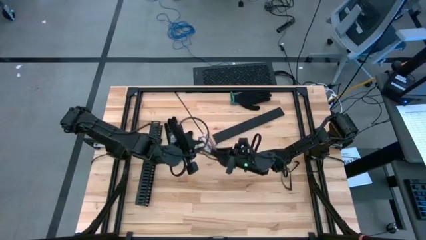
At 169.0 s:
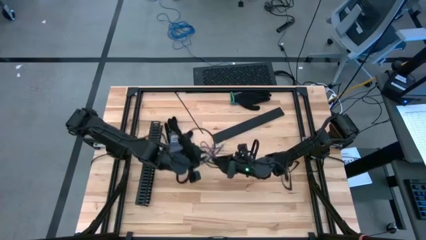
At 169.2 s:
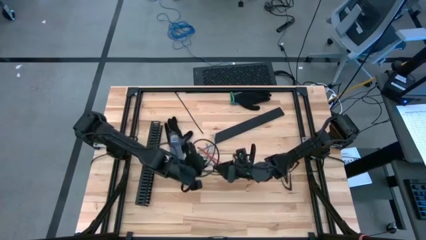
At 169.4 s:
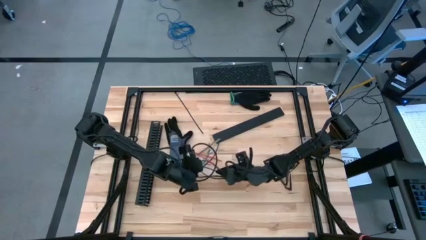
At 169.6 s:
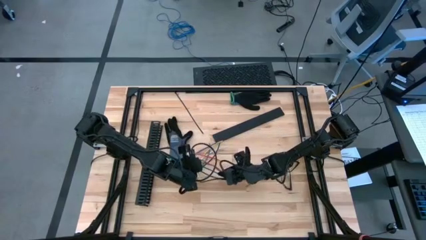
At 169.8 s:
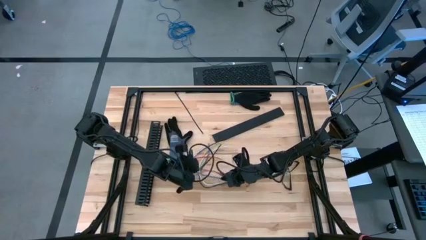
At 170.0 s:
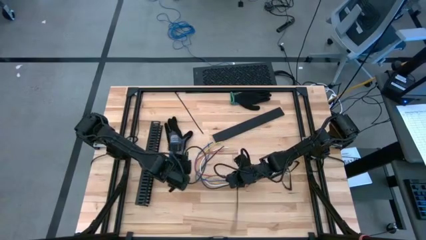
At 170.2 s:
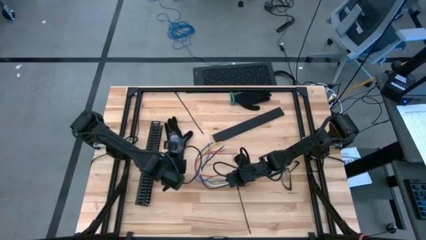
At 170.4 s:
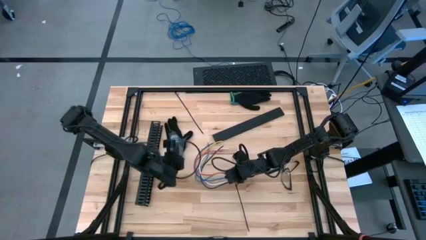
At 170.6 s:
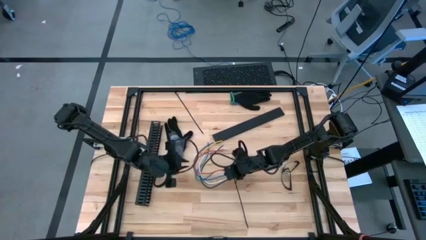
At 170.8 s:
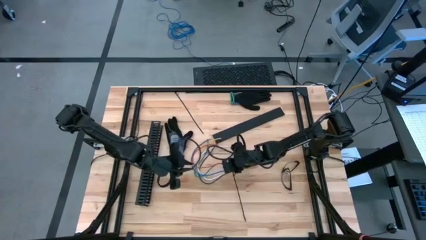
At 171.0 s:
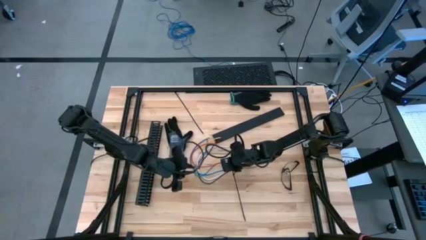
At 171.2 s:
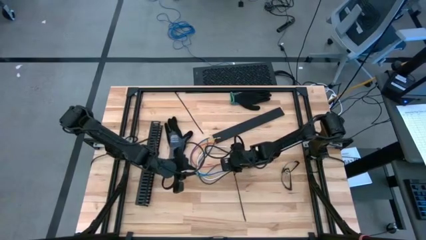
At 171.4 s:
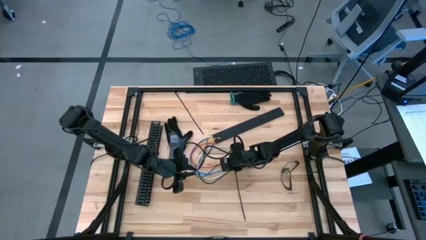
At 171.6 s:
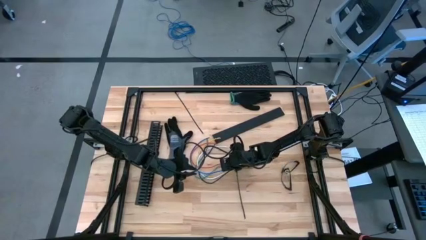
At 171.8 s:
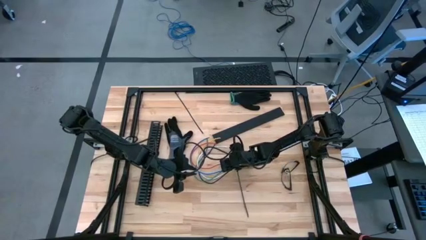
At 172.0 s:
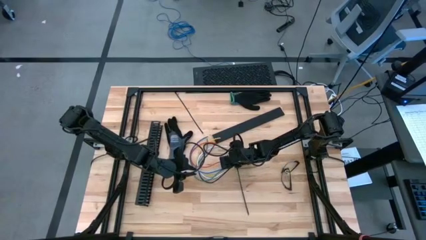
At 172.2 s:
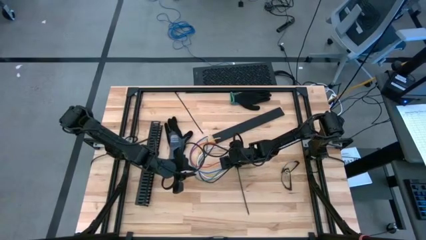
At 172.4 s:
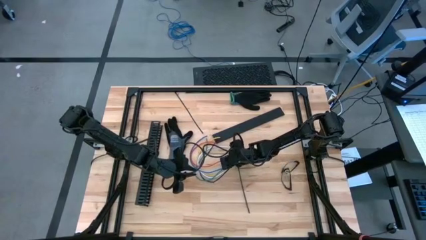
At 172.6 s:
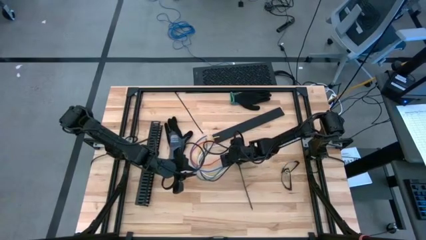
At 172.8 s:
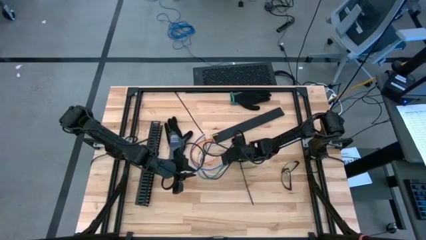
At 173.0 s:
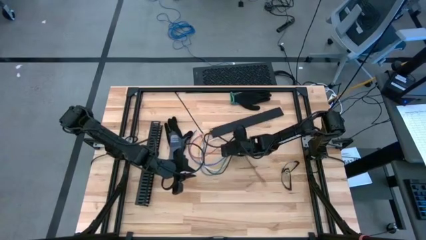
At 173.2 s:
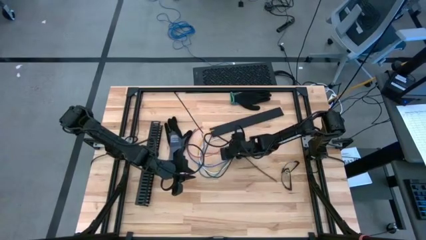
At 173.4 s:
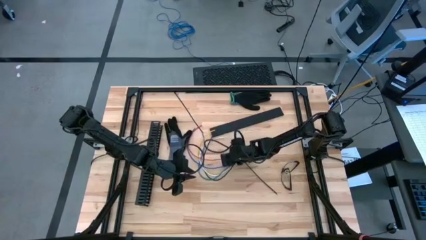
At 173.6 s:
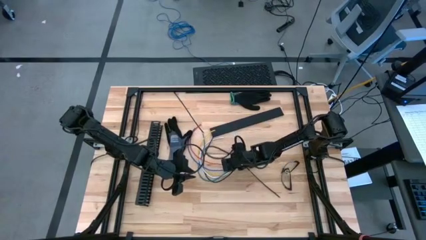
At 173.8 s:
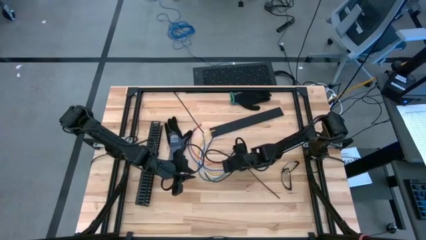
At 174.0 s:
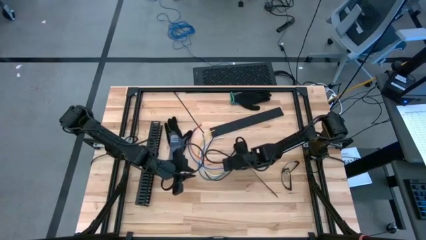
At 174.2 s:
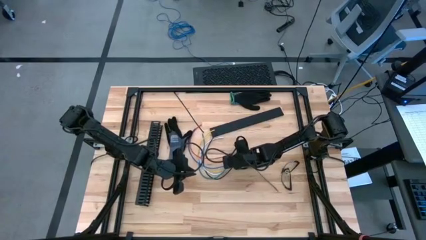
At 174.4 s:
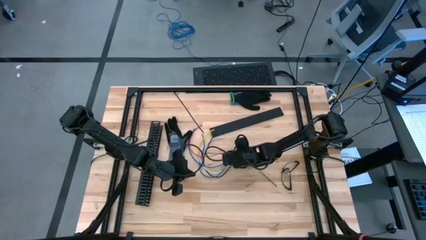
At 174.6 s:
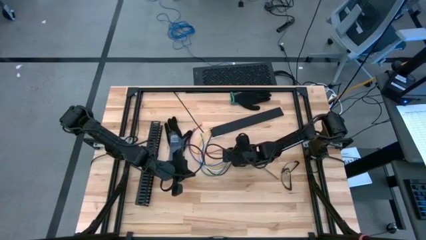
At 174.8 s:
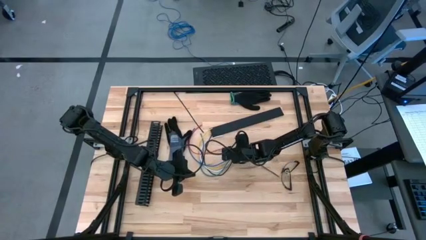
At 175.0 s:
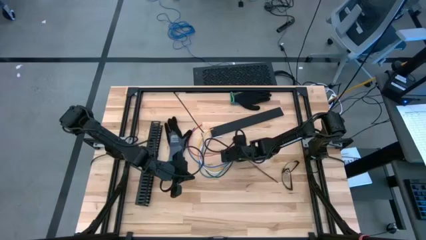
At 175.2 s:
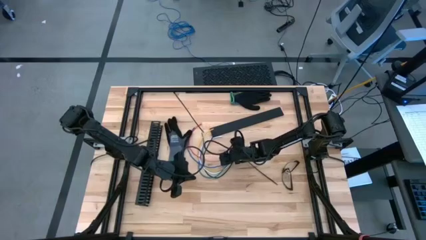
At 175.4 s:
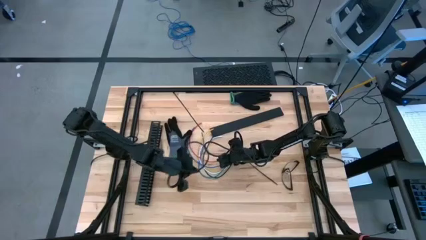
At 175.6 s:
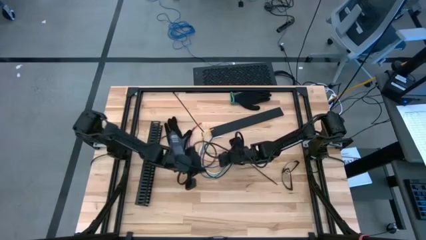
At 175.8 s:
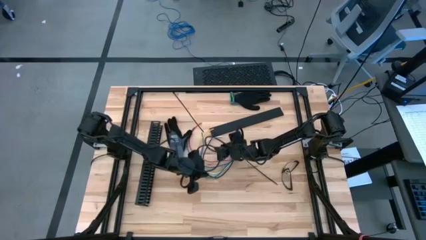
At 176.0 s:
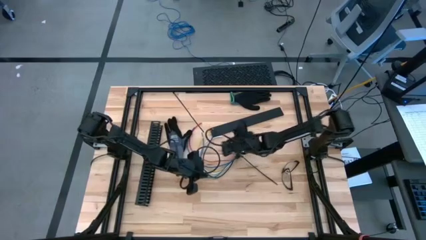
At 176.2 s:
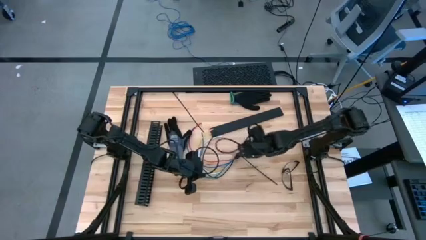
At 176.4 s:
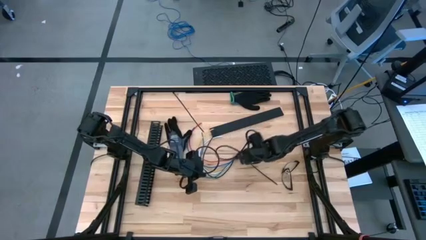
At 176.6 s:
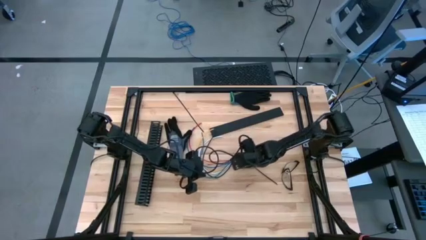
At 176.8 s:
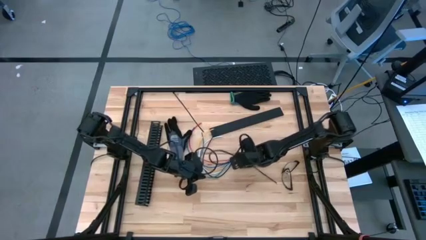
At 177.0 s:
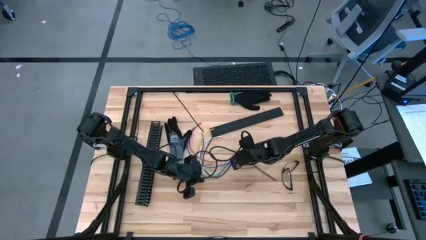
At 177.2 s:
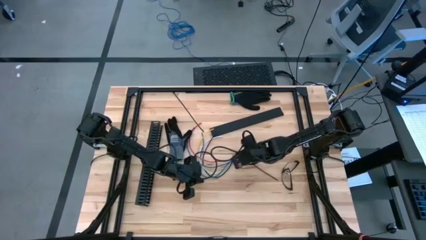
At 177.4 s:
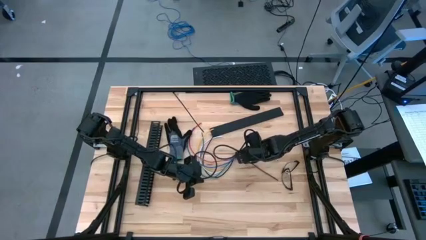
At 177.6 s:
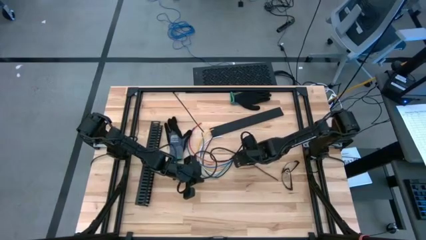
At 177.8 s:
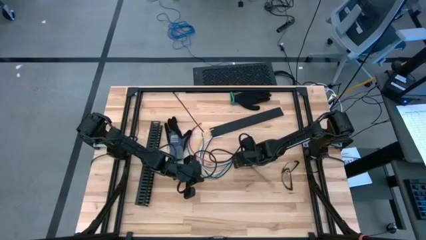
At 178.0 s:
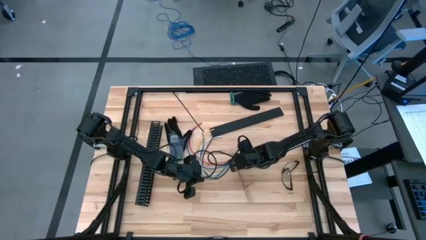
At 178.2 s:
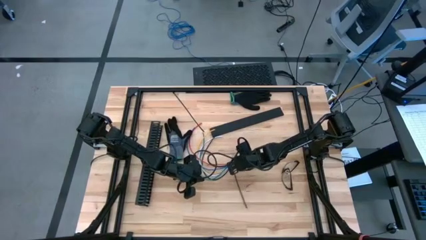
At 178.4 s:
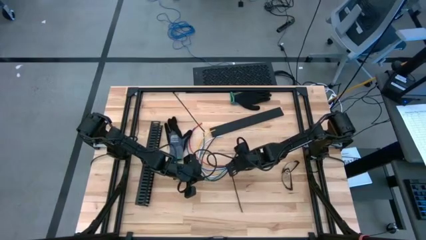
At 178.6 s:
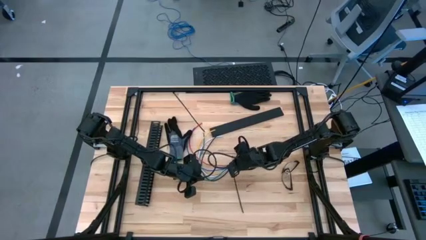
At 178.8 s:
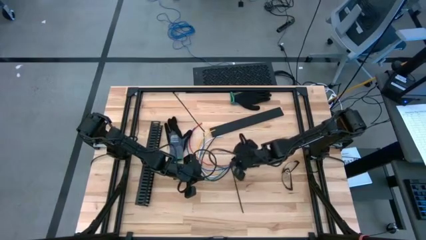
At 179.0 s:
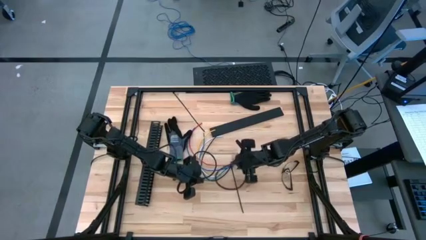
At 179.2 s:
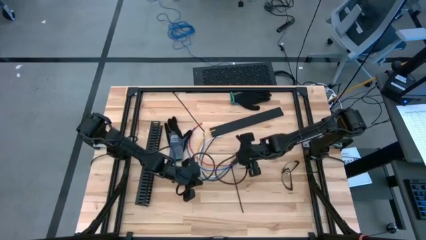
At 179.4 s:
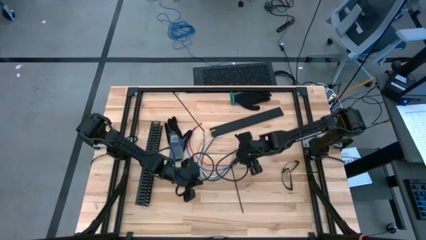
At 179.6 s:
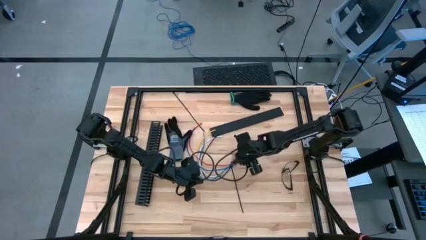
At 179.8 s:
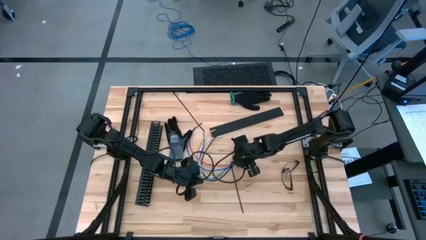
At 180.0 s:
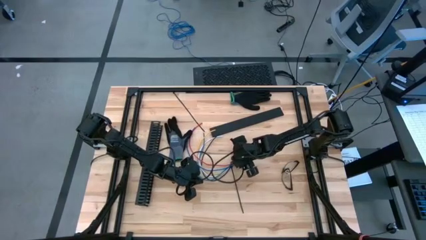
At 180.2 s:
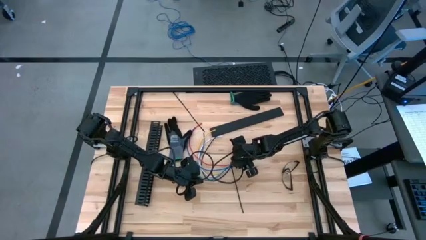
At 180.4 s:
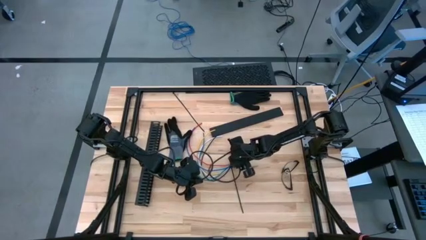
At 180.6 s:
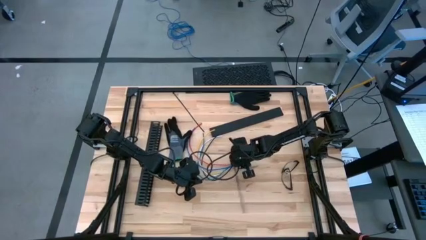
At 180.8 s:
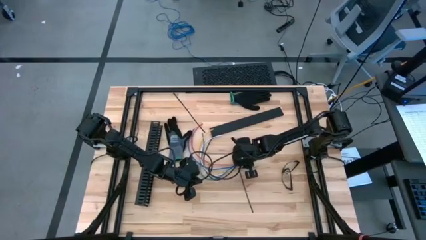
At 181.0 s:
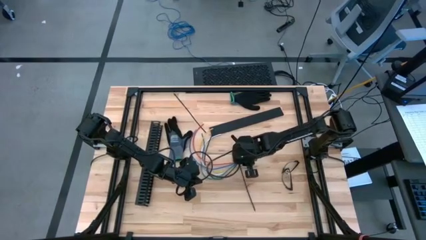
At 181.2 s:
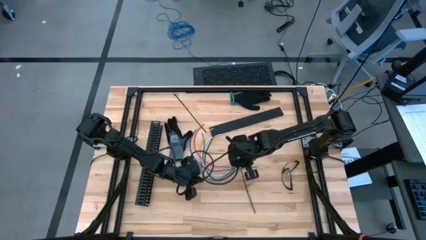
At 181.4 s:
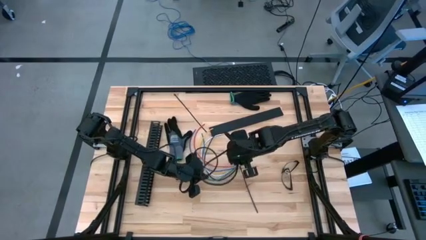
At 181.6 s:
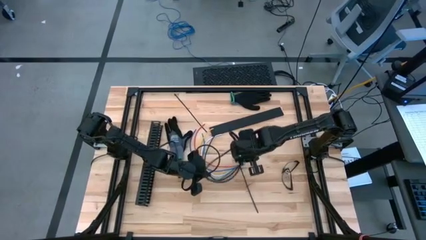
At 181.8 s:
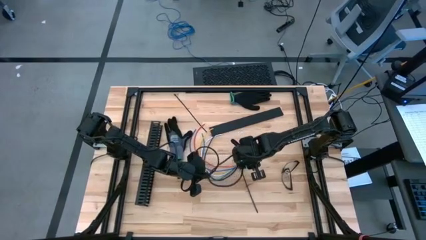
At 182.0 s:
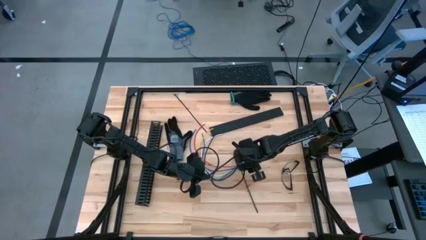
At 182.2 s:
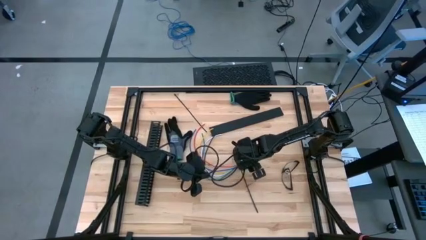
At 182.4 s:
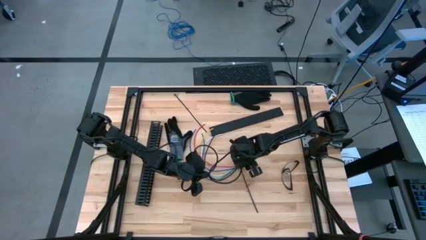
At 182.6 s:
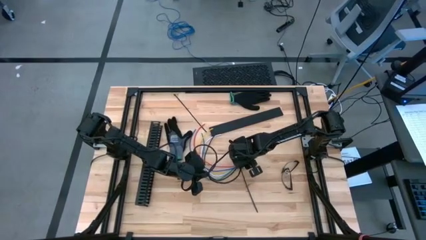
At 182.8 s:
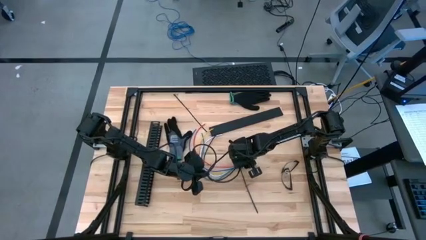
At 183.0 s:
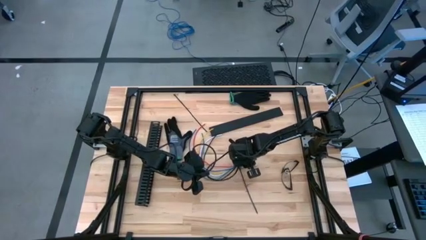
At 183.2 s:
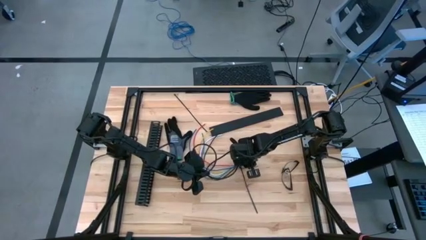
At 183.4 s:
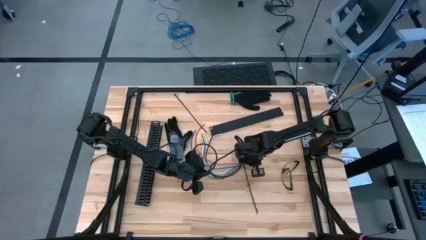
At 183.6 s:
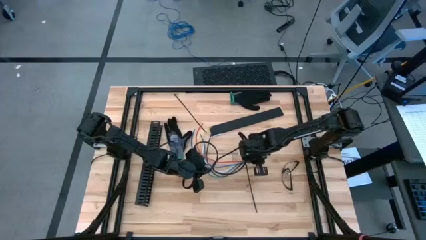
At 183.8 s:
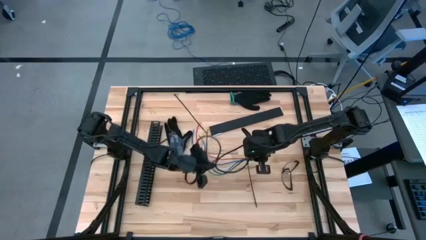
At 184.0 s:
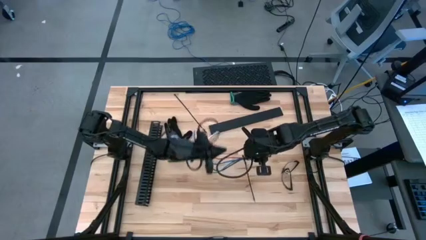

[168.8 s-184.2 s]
Task: Ziptie cables
Wrap the cable wires with the black zip tie
